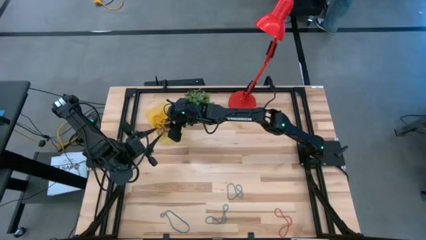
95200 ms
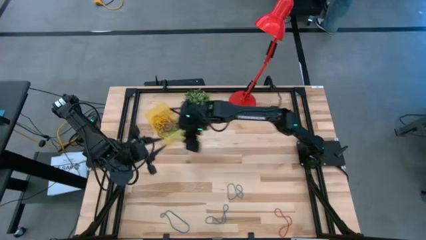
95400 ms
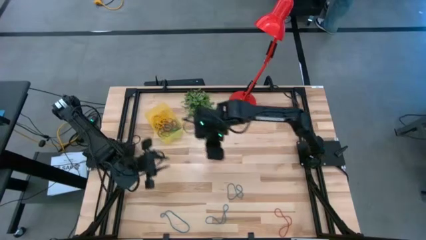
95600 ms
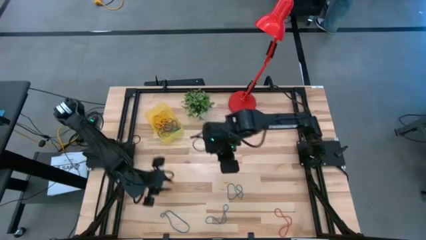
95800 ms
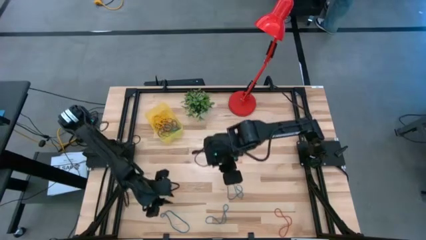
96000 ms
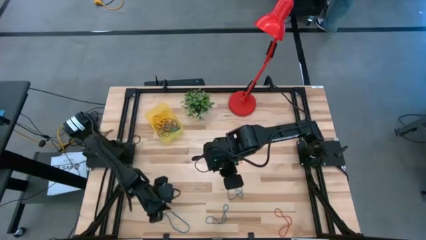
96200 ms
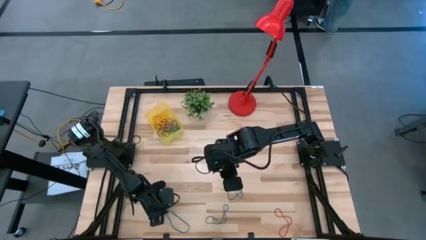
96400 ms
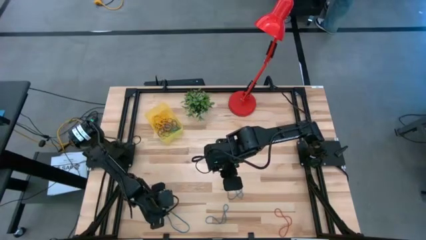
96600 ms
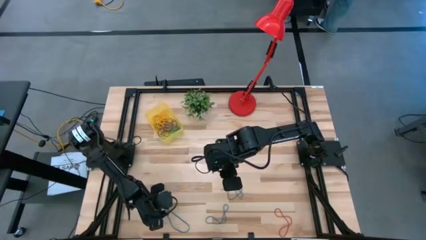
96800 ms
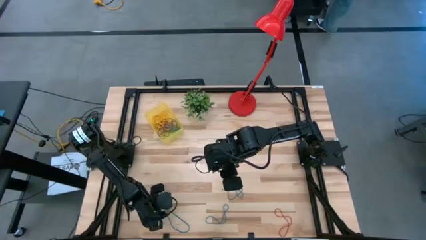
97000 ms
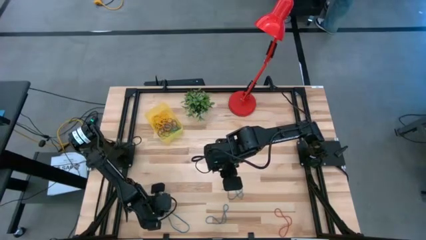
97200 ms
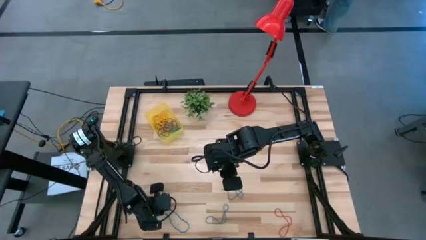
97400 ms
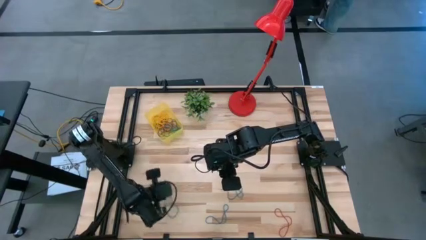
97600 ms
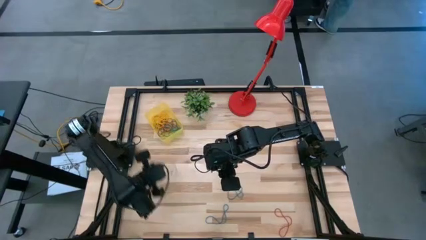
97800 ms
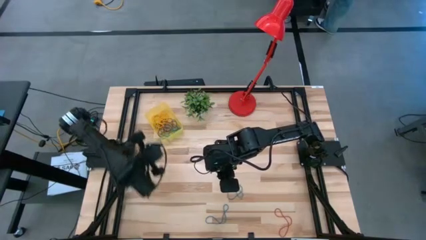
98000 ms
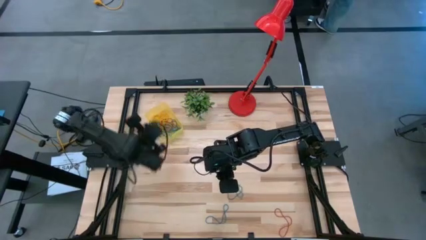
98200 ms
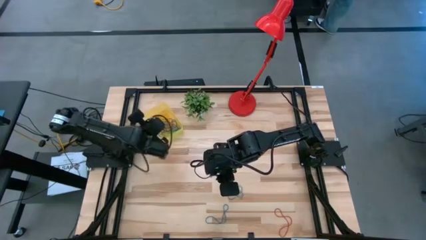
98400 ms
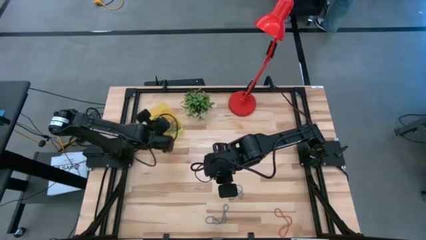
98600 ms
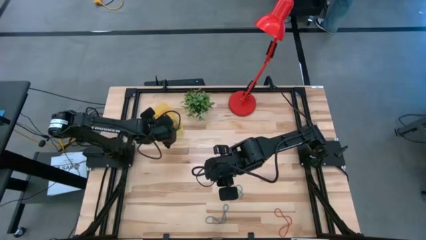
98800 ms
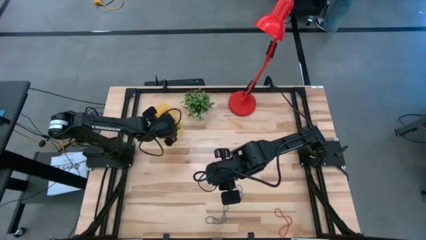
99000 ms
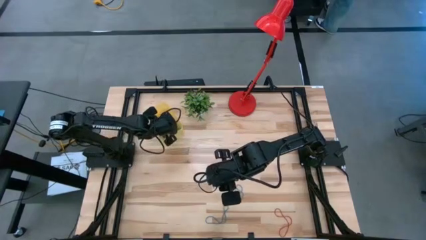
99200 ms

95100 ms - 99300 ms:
Task: Pick and place items into bin
Put the blue rubber band into the yellow bin

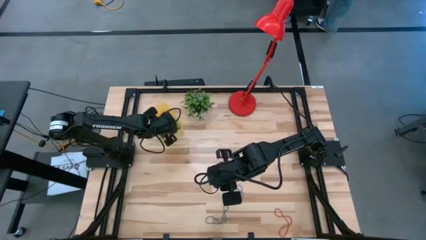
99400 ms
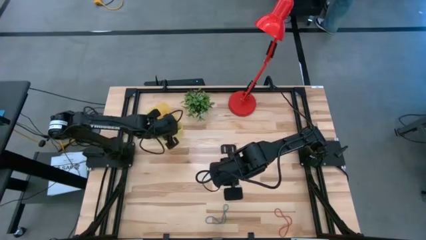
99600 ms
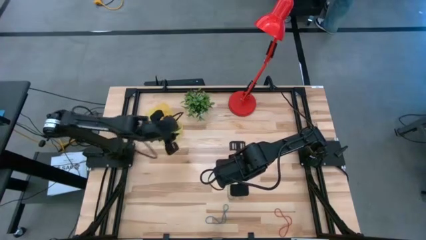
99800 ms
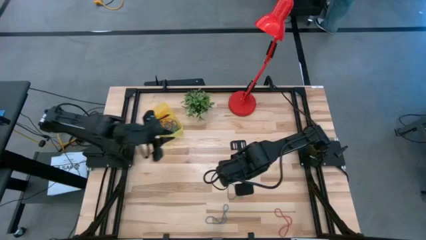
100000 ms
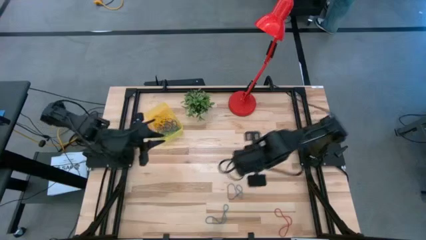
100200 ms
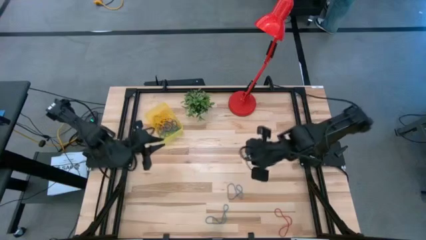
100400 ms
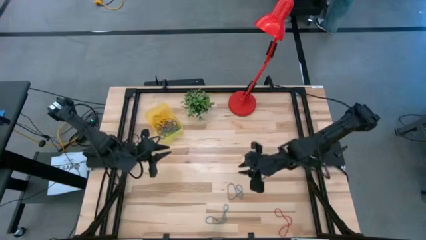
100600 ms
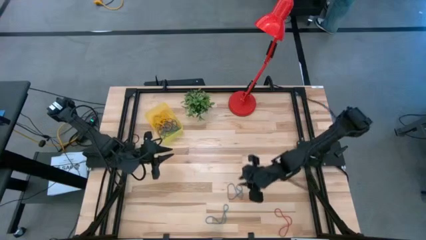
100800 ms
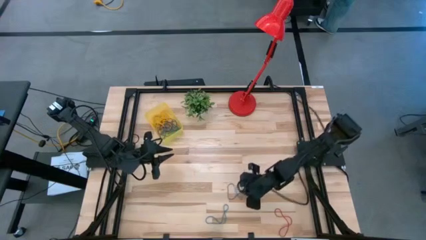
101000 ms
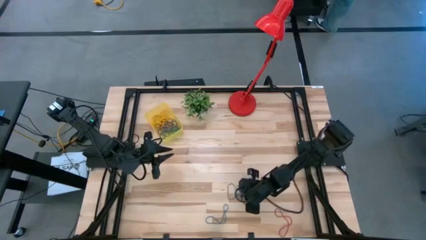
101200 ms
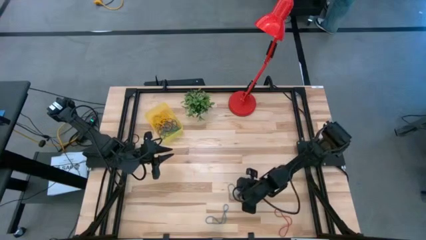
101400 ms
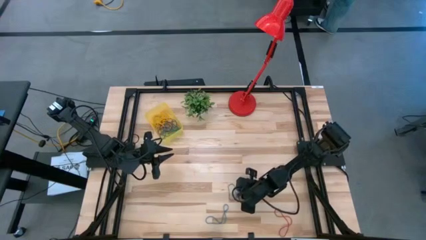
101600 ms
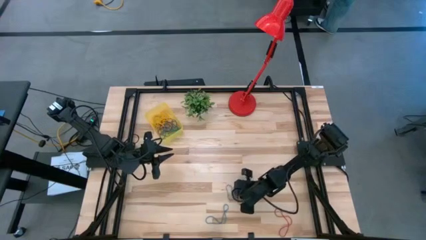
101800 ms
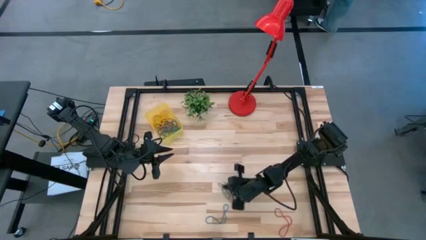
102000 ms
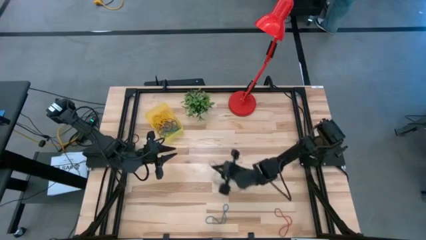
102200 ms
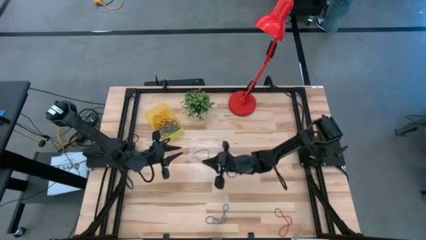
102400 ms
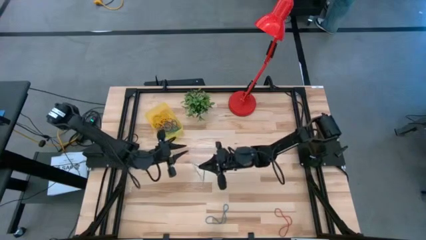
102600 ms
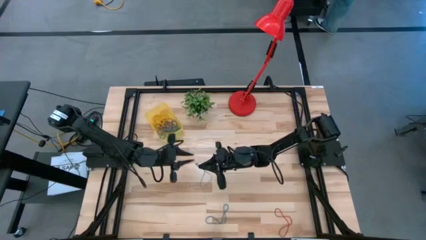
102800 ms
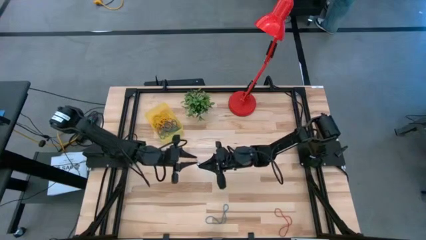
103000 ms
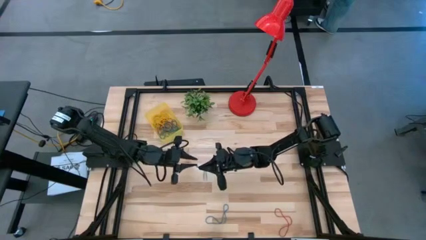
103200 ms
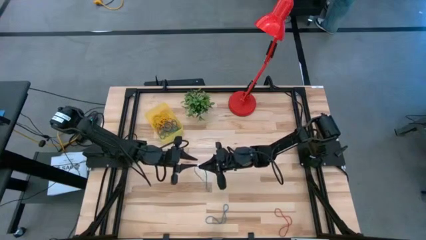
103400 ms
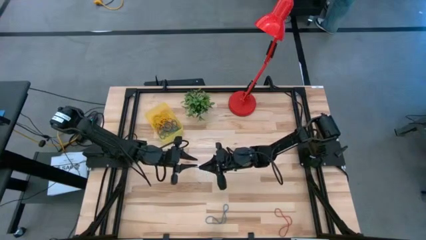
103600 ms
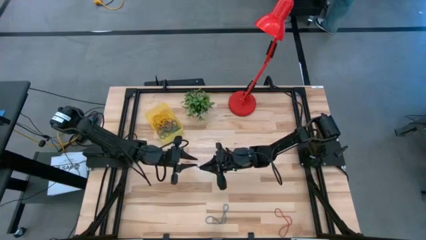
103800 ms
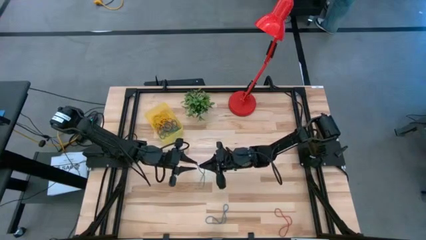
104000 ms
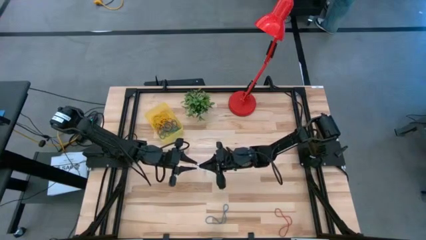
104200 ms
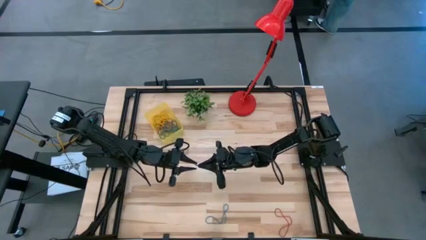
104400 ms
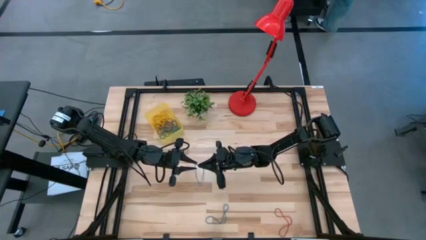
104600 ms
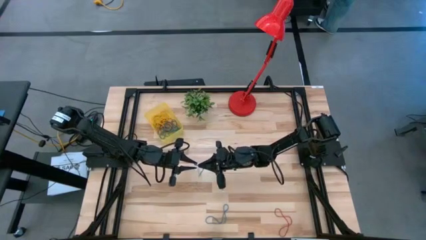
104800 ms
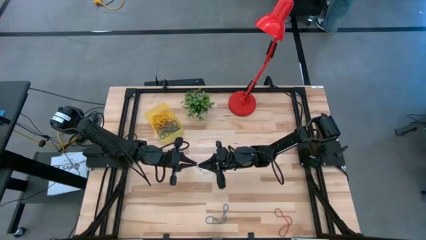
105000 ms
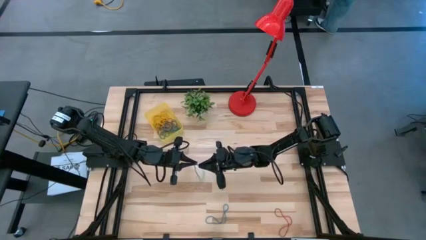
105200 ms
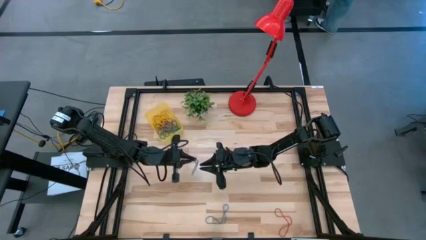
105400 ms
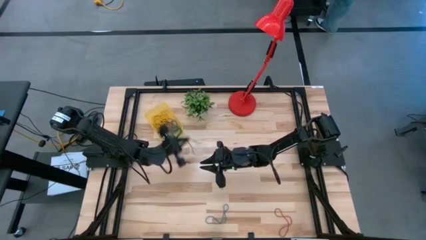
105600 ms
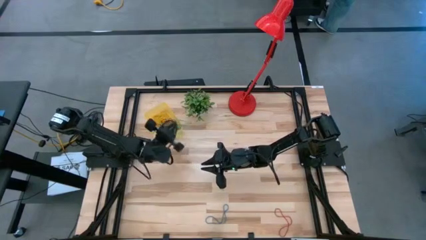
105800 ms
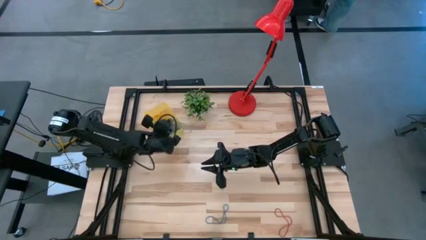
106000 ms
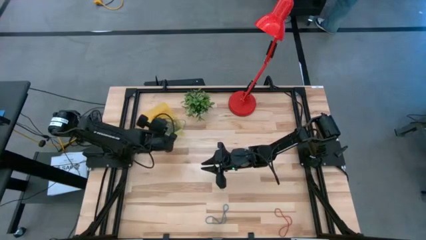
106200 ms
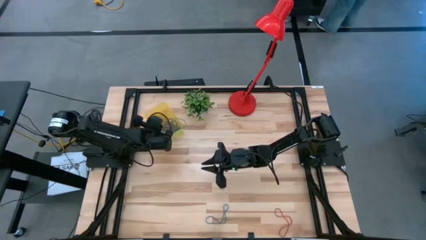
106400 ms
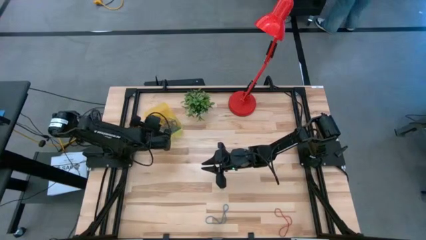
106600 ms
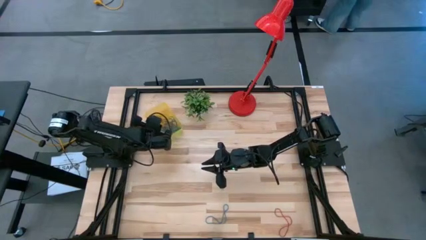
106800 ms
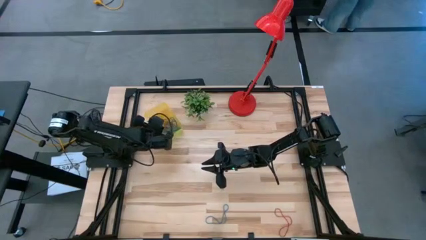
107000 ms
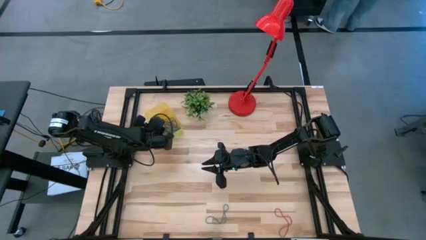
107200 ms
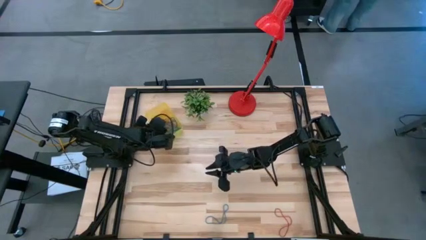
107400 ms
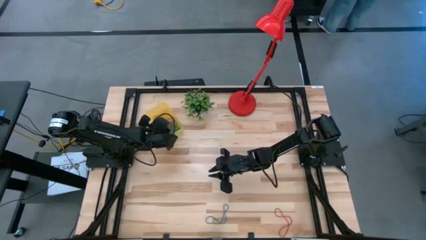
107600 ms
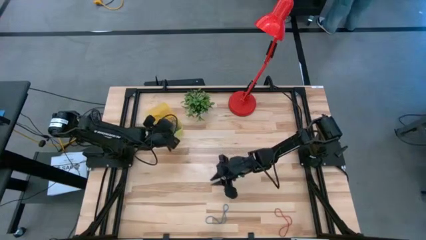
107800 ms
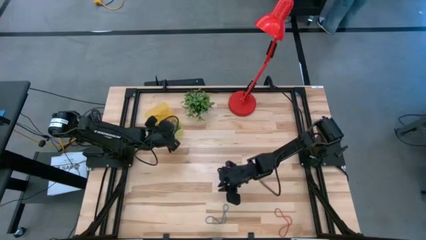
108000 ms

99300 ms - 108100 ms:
Put the blue rubber band into the yellow bin

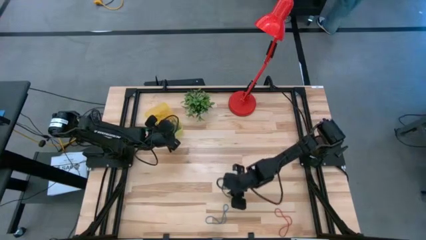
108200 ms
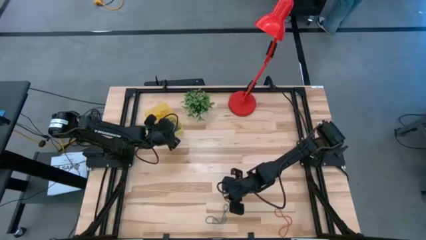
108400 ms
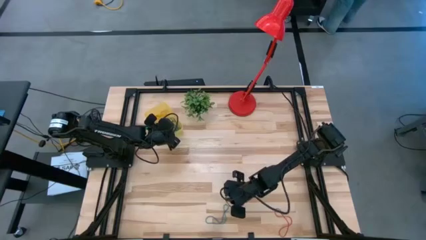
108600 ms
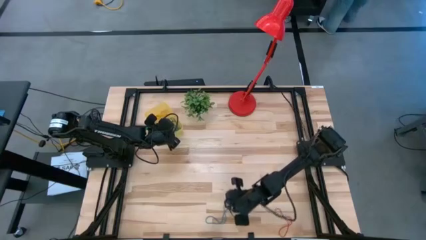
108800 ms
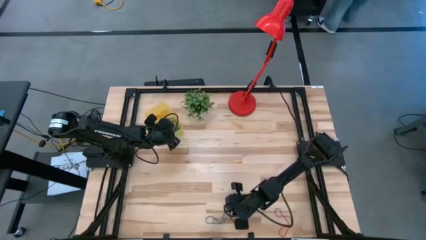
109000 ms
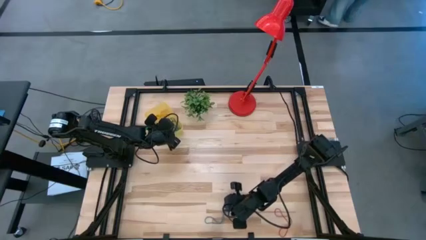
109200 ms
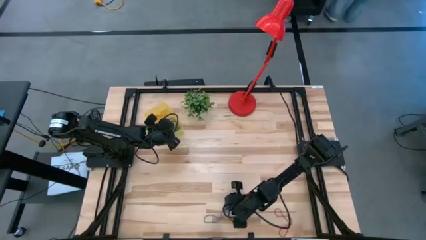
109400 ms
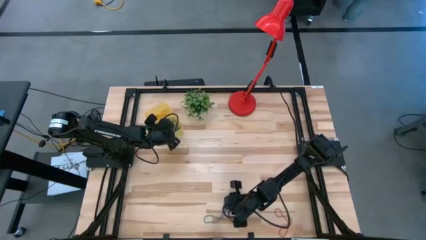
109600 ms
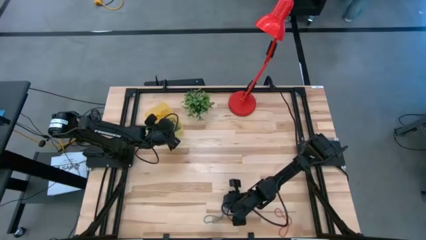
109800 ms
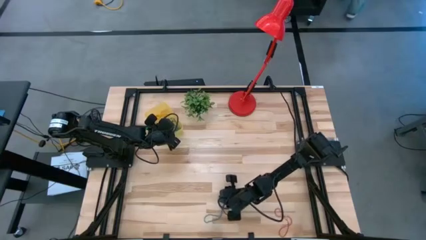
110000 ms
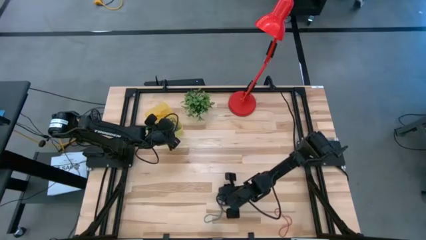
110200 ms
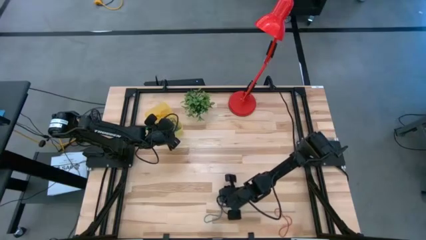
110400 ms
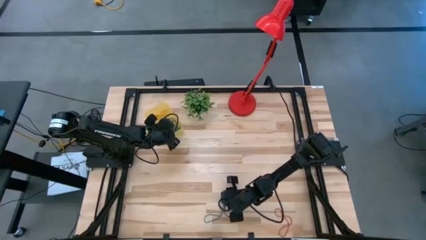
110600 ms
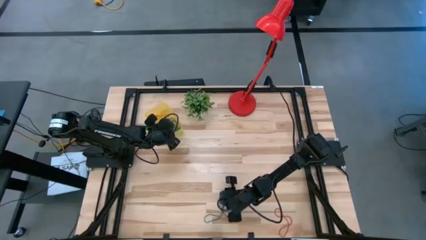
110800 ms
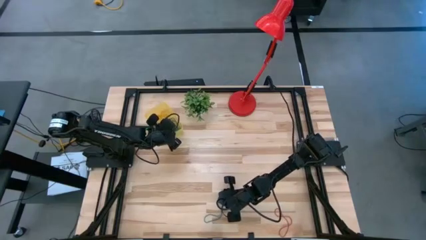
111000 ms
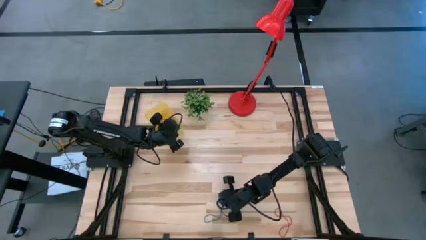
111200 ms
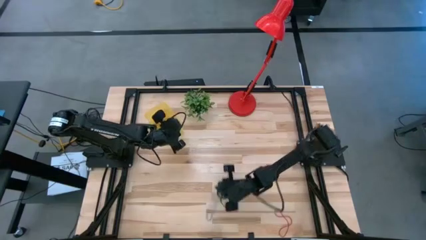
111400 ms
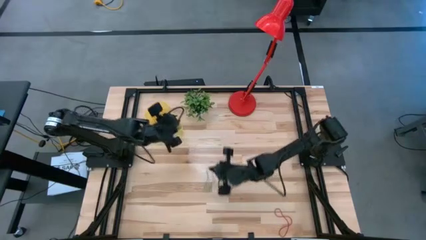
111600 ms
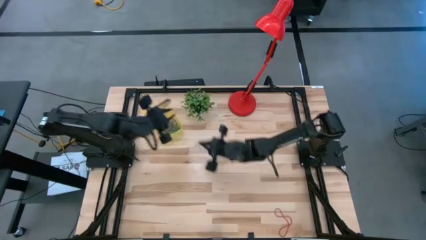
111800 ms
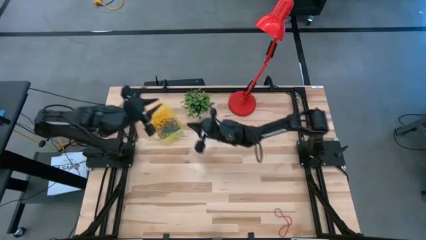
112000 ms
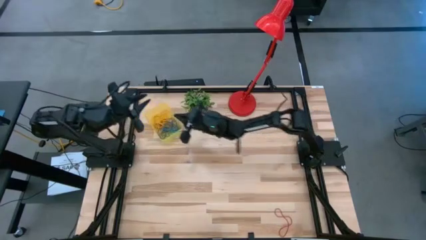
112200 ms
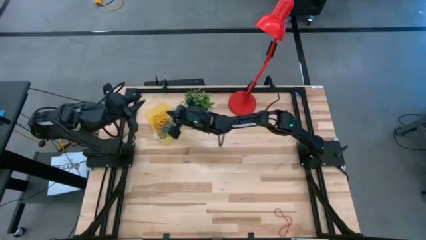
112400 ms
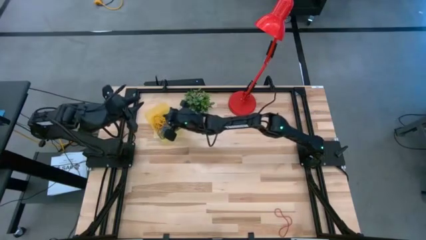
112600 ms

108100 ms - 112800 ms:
Put the blue rubber band into the yellow bin
